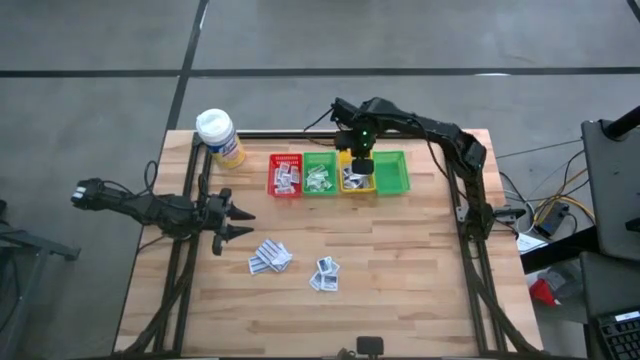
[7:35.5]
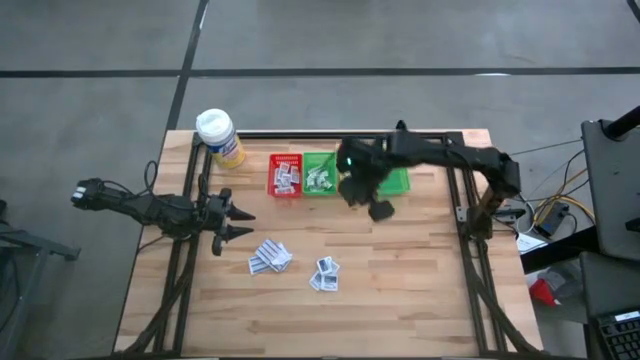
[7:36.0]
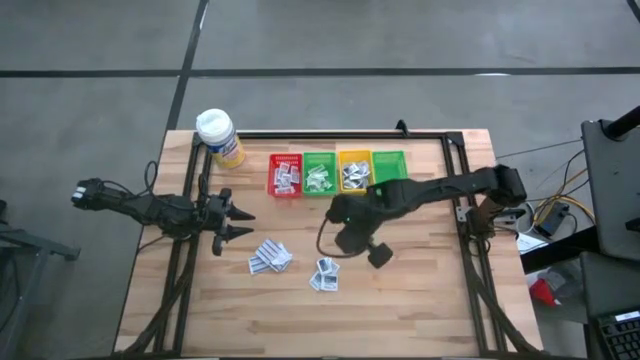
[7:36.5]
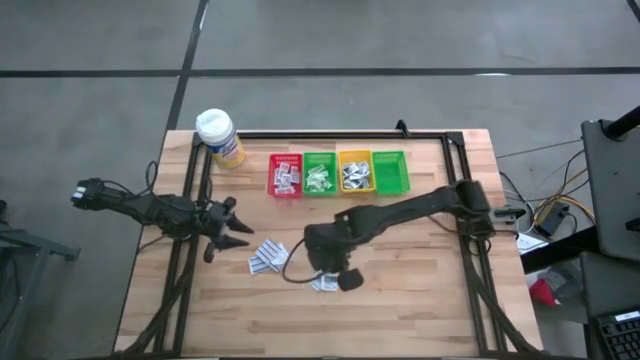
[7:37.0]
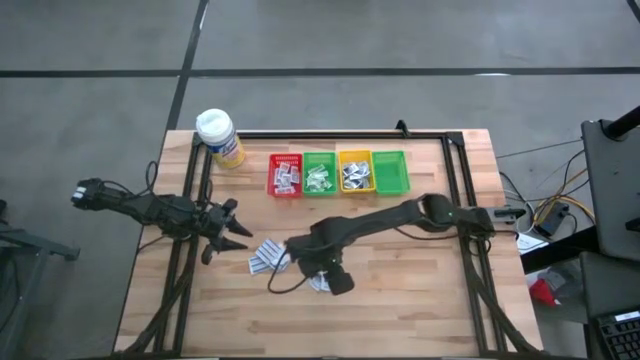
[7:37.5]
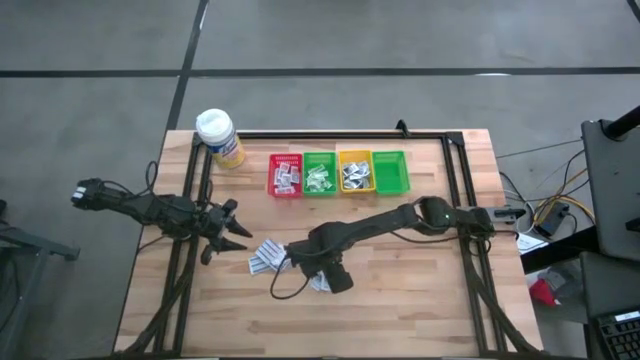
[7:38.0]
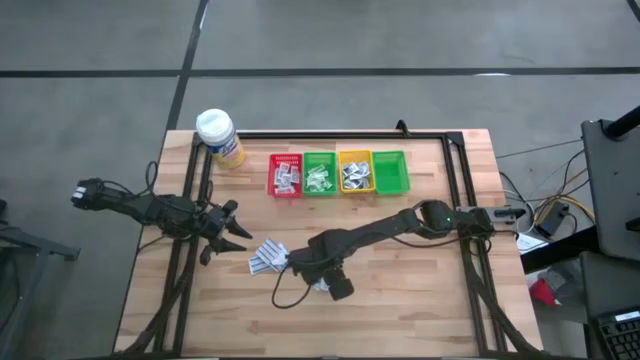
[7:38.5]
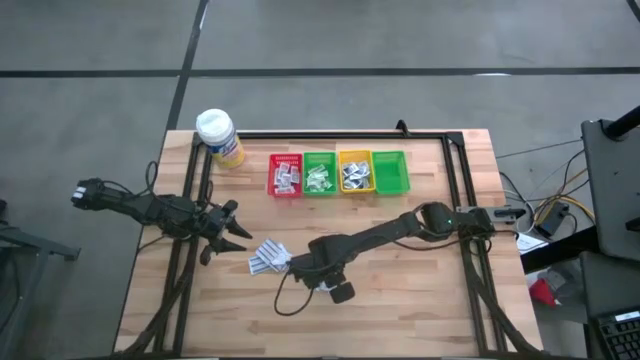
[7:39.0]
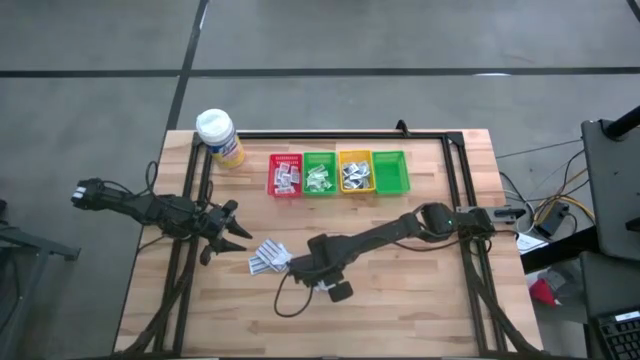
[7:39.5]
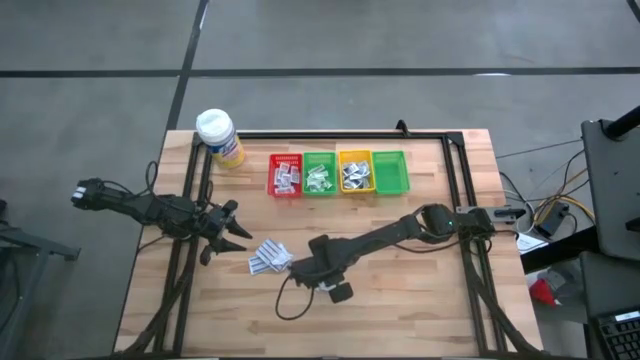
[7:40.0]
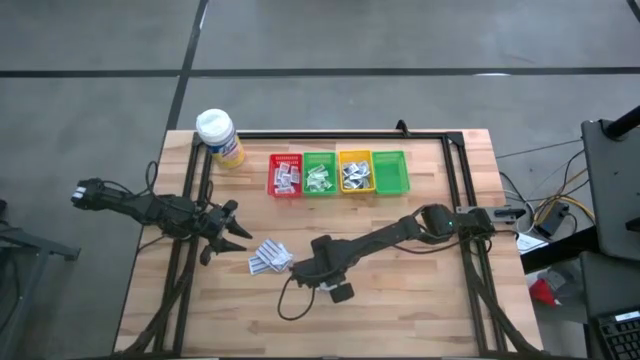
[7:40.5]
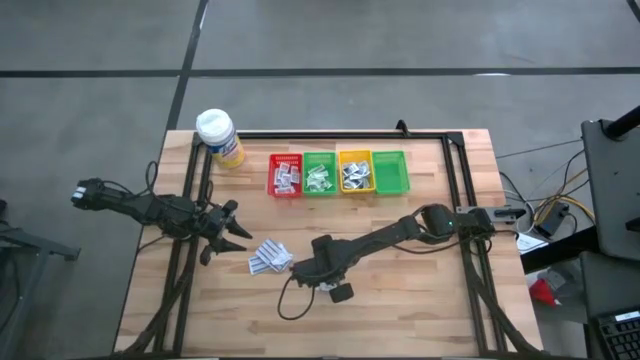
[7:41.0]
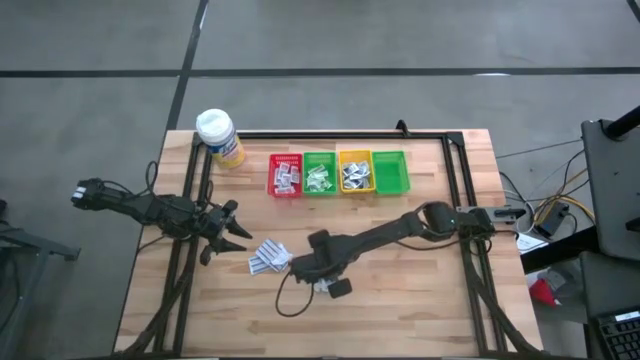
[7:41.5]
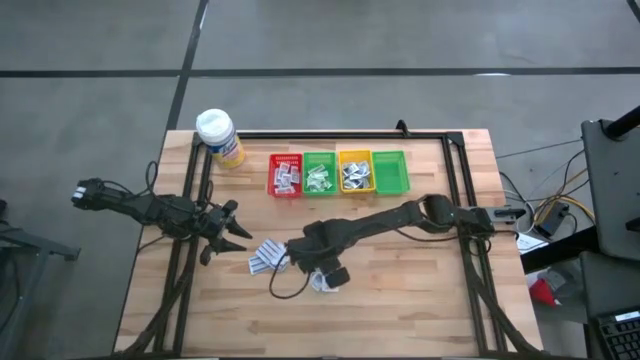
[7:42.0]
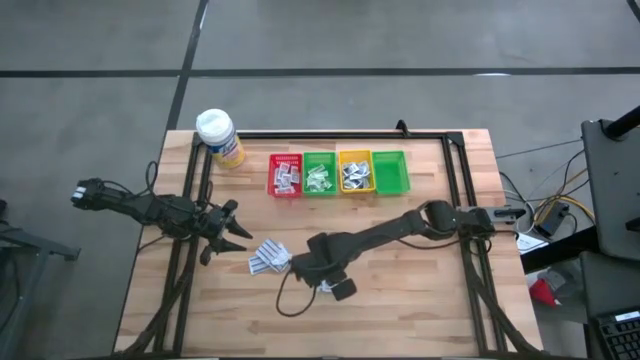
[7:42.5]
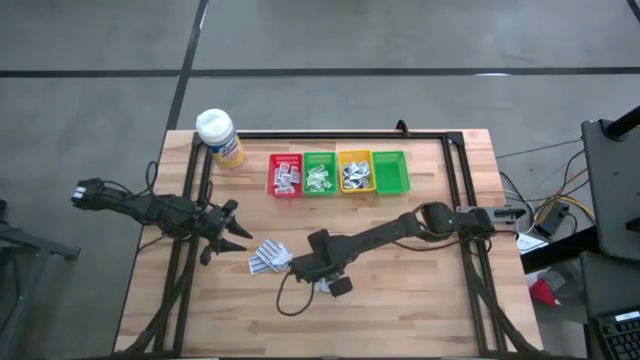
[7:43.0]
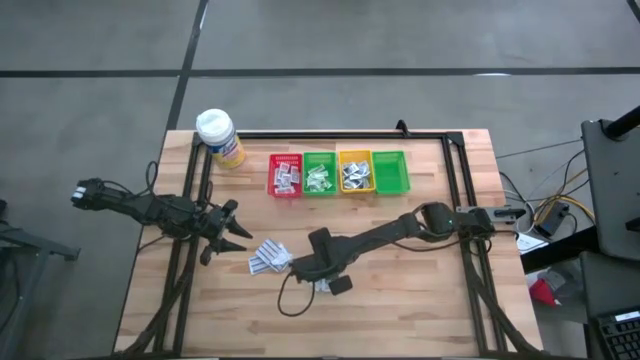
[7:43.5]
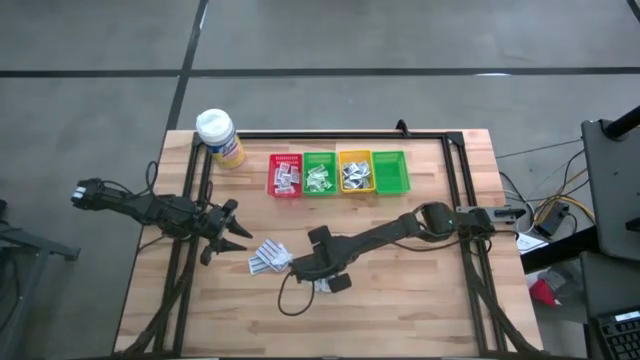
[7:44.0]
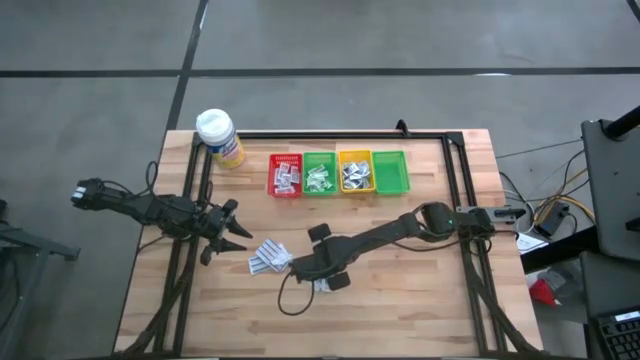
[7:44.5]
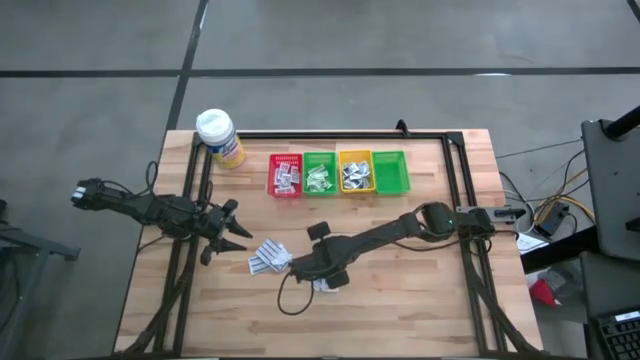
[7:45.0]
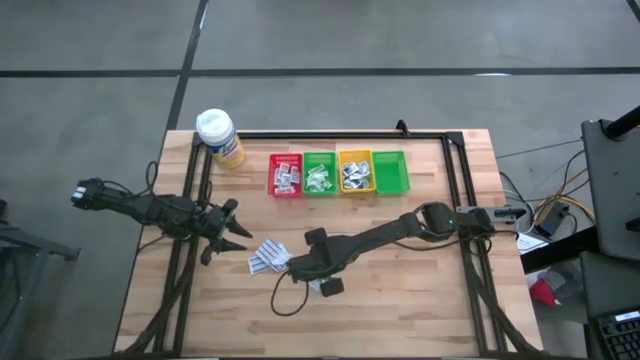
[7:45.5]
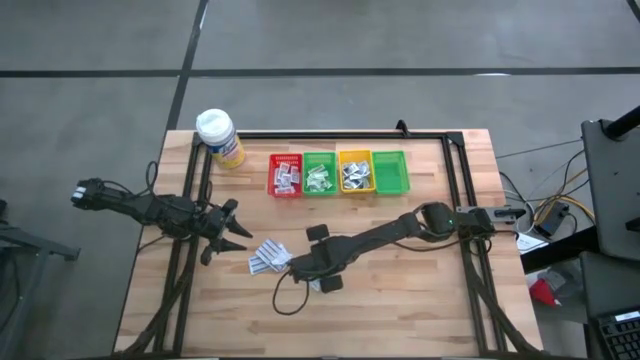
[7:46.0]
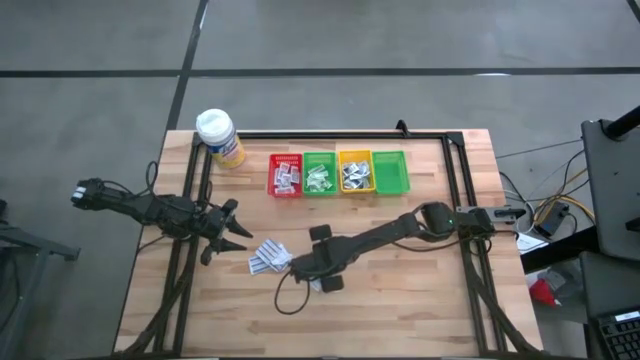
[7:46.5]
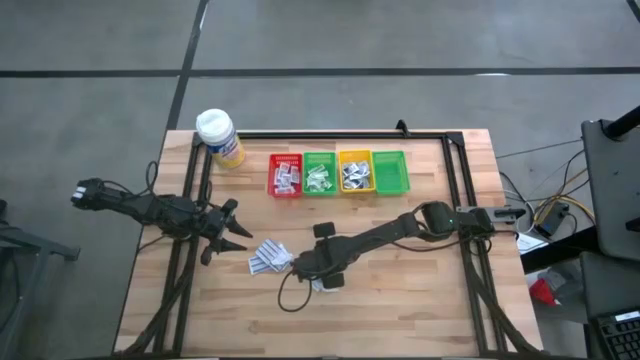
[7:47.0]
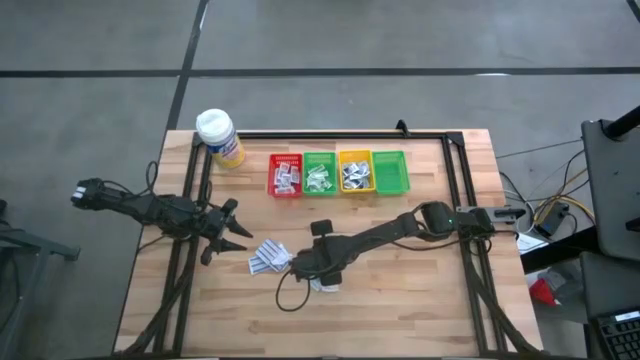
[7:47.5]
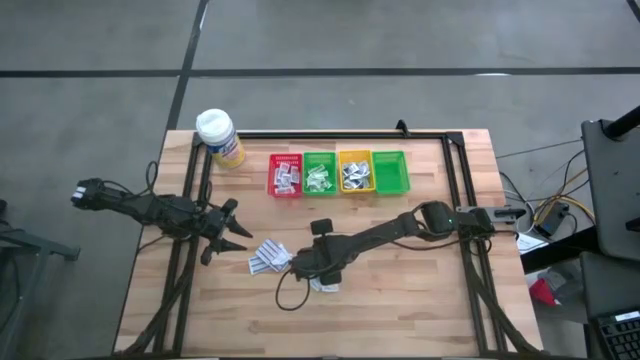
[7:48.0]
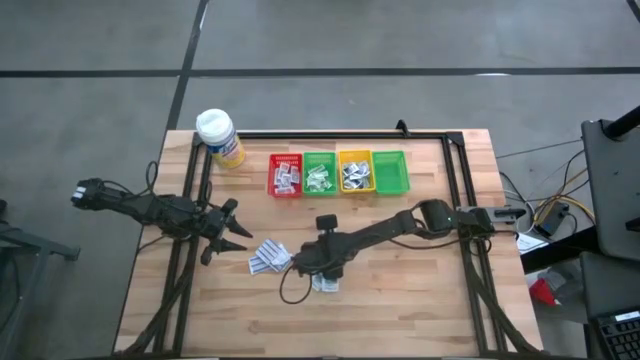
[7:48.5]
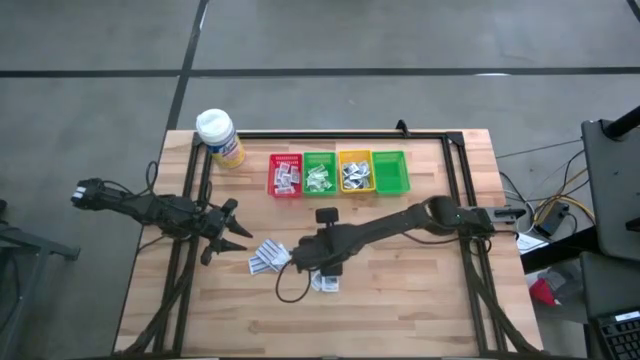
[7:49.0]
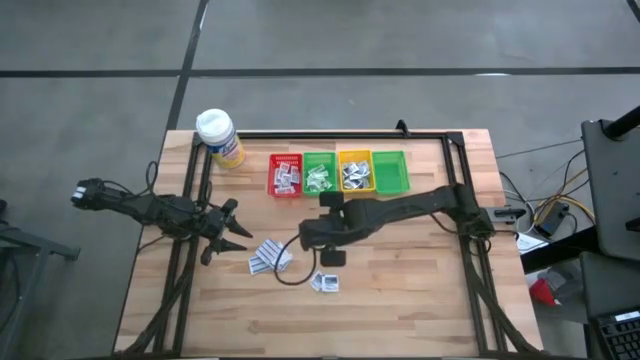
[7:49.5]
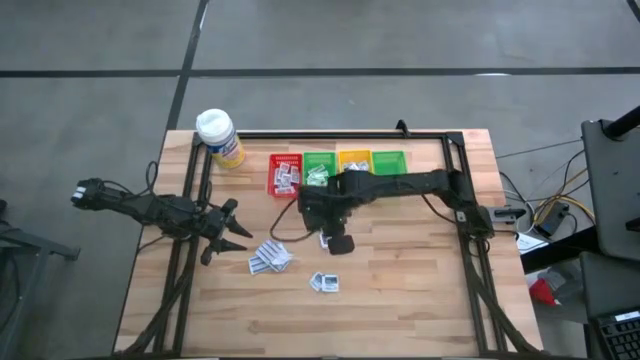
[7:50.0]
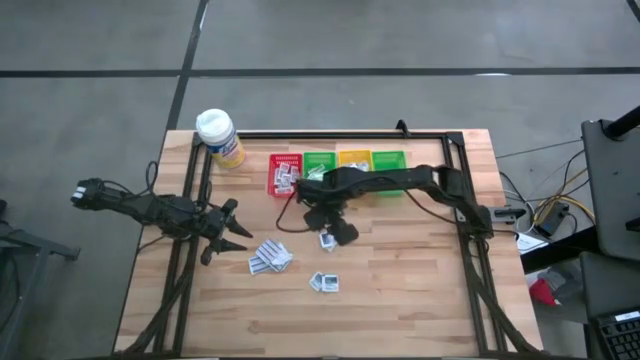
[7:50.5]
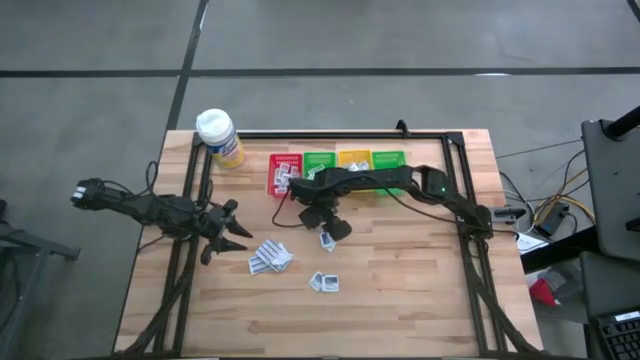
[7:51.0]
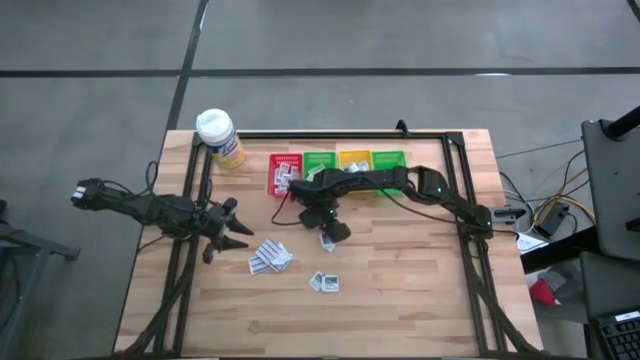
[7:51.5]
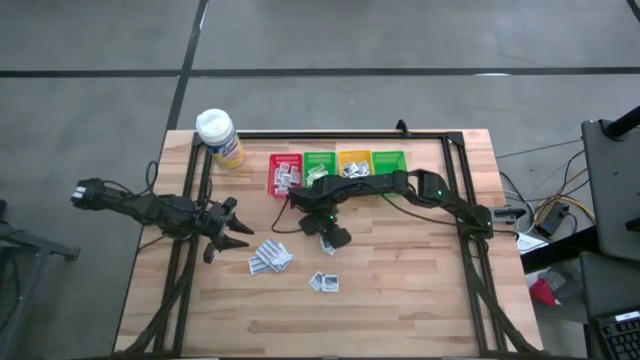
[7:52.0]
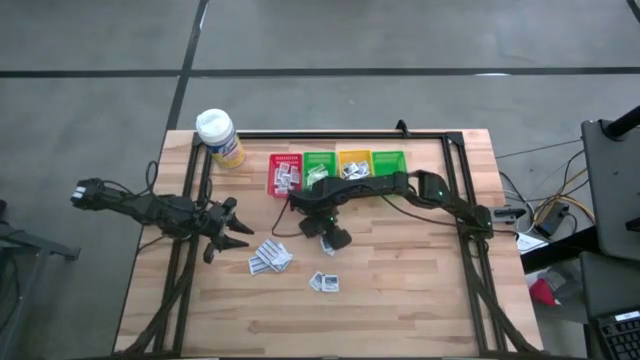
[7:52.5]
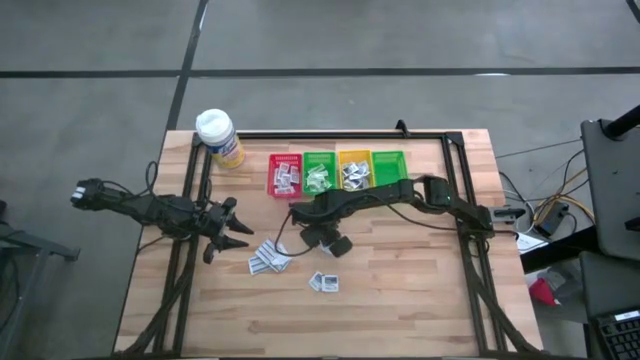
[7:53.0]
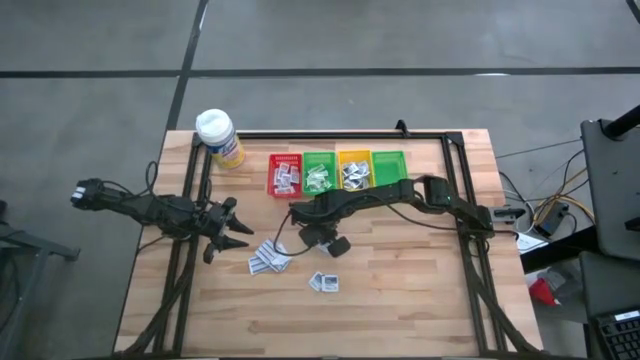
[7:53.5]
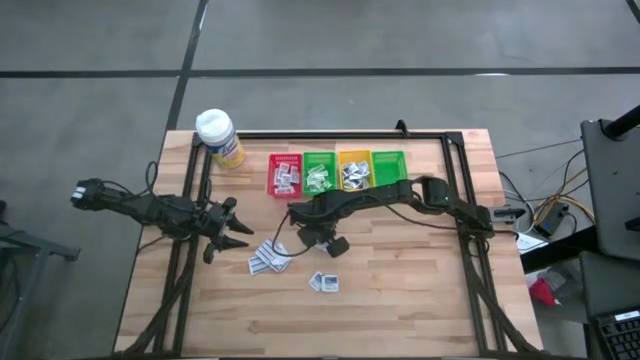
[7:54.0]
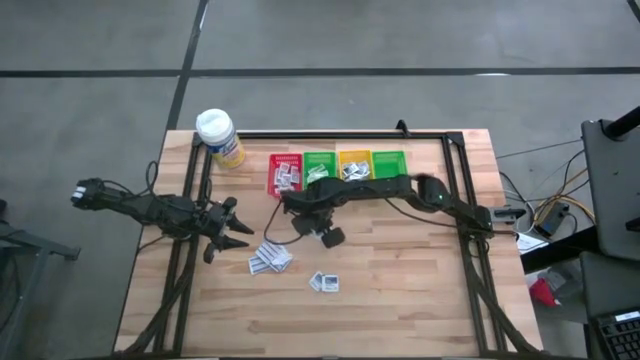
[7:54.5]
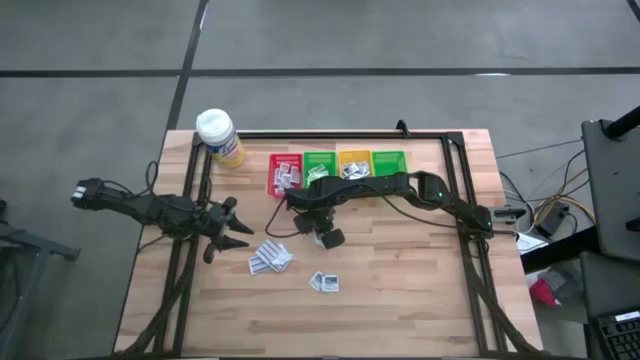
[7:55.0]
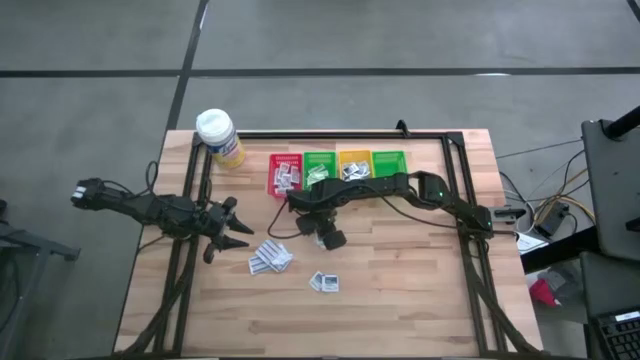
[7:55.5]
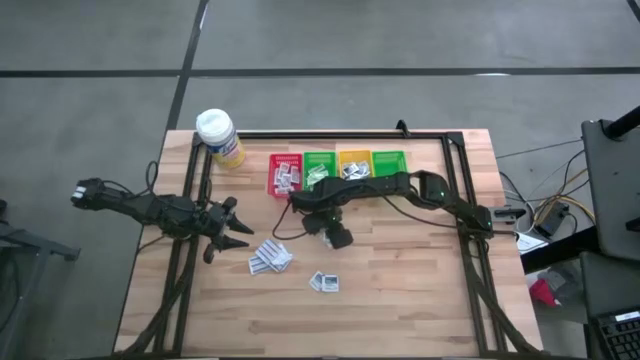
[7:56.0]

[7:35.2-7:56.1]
Task: Pick & Place First Aid Supplies
Put the alcohol pad into the yellow bin
